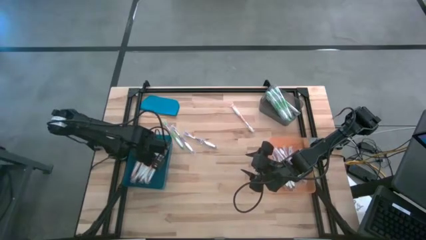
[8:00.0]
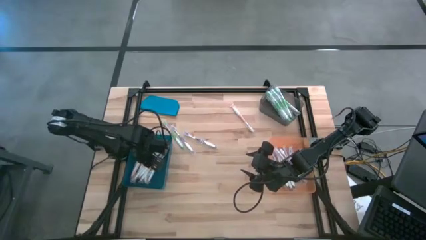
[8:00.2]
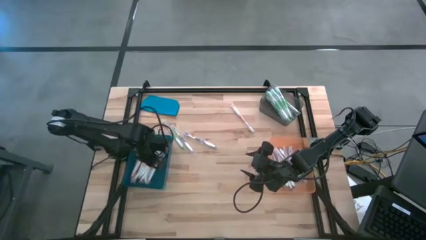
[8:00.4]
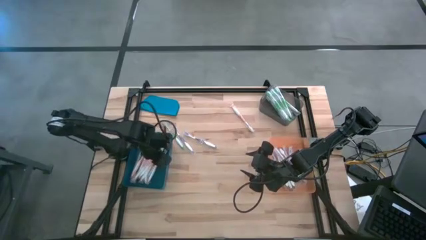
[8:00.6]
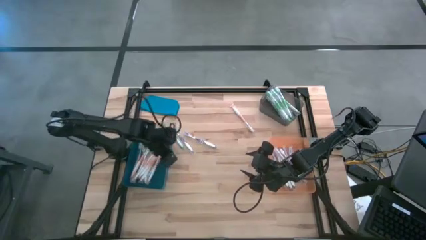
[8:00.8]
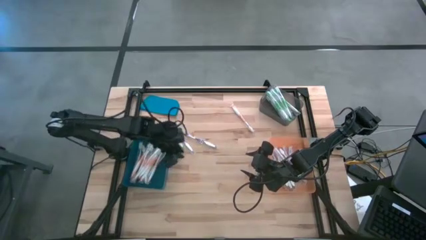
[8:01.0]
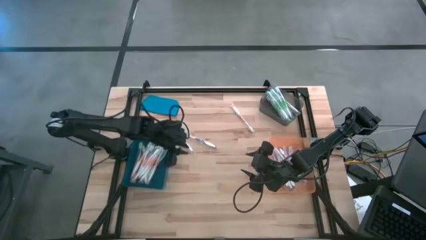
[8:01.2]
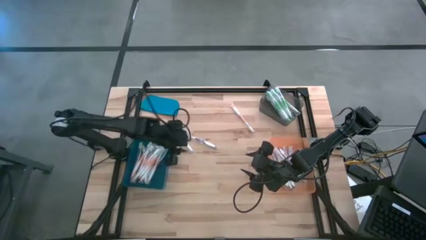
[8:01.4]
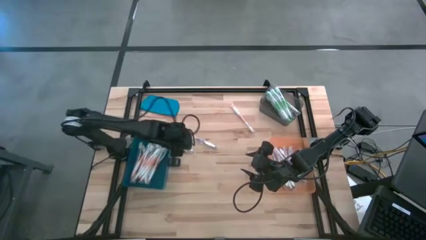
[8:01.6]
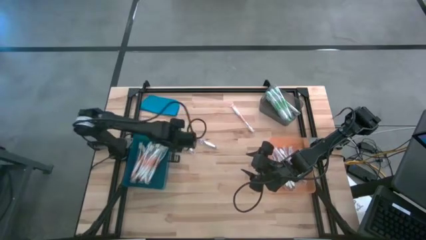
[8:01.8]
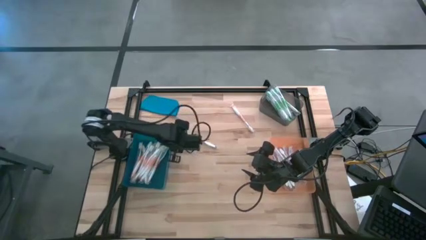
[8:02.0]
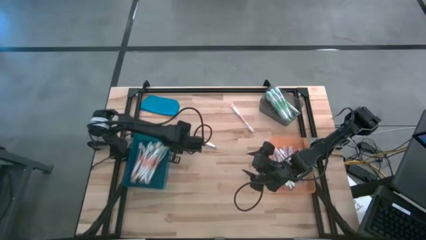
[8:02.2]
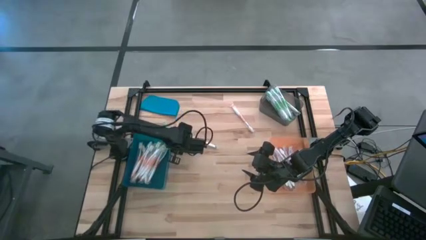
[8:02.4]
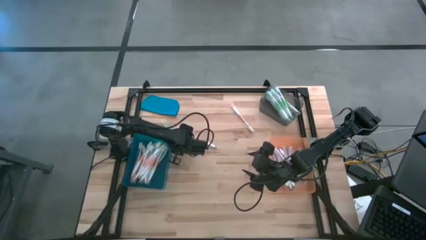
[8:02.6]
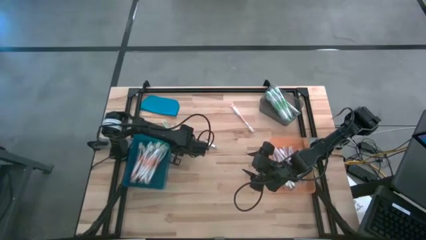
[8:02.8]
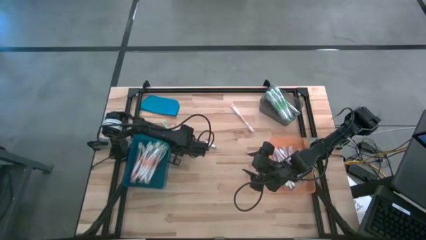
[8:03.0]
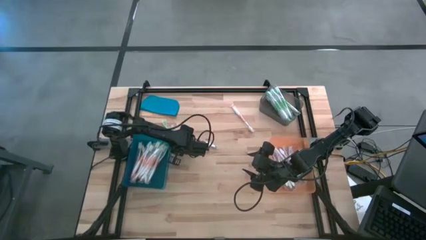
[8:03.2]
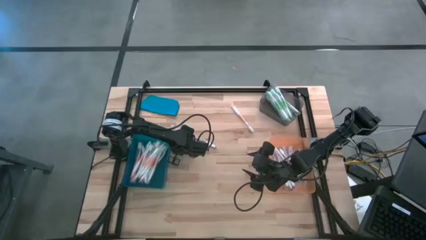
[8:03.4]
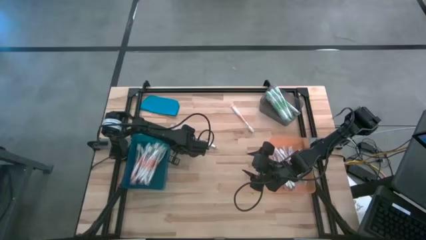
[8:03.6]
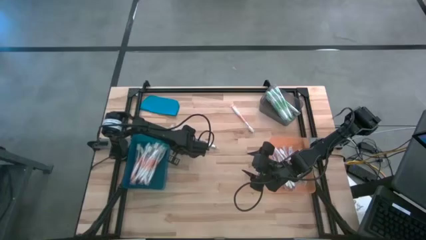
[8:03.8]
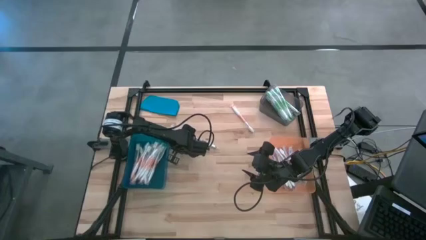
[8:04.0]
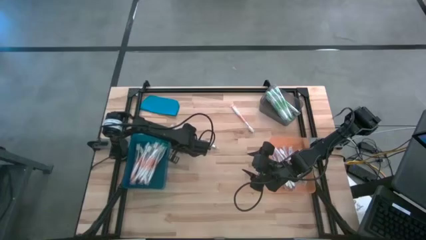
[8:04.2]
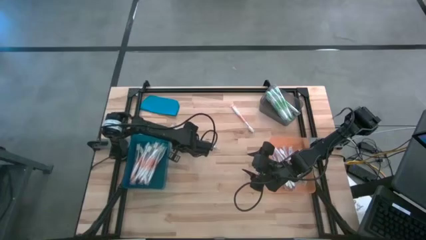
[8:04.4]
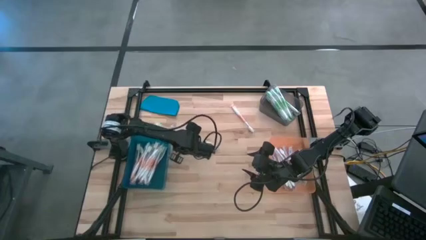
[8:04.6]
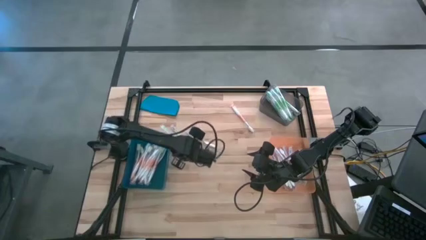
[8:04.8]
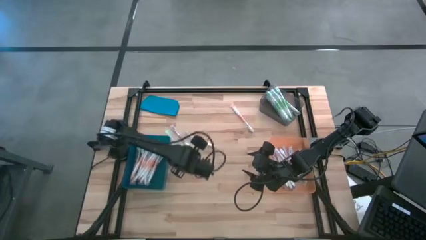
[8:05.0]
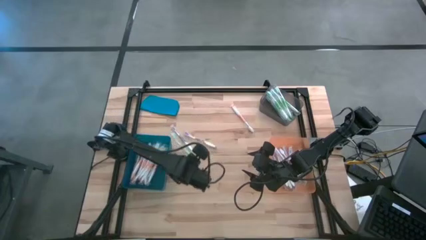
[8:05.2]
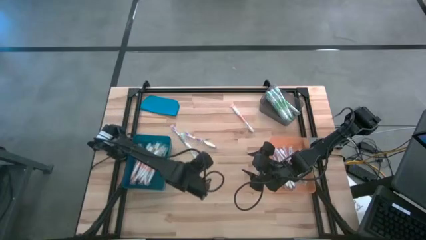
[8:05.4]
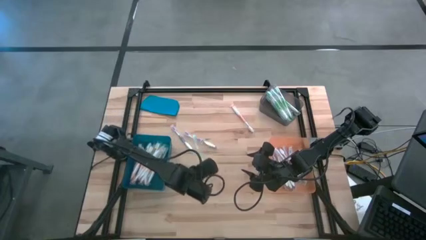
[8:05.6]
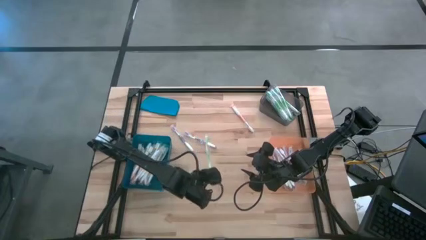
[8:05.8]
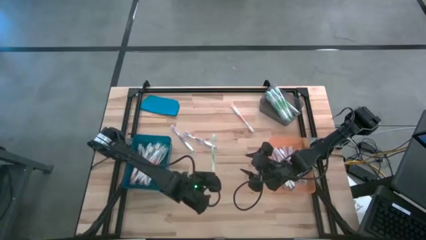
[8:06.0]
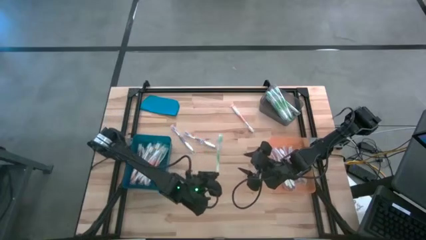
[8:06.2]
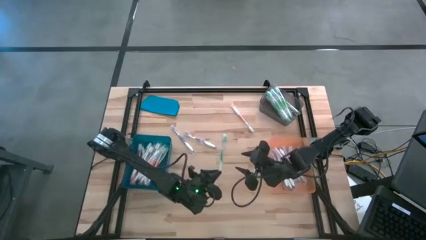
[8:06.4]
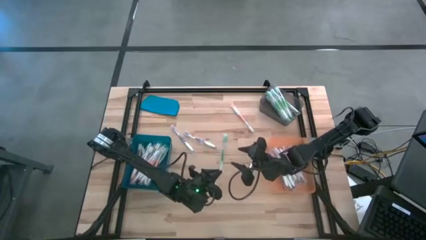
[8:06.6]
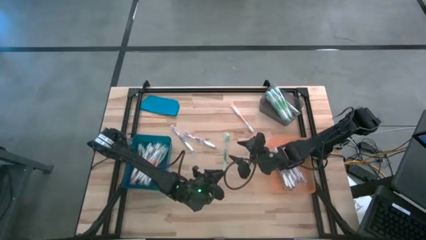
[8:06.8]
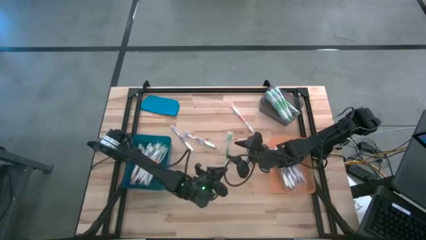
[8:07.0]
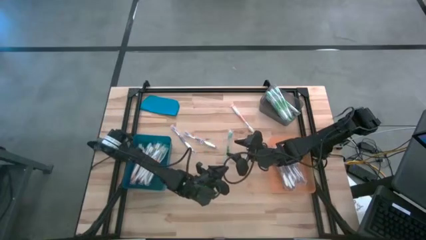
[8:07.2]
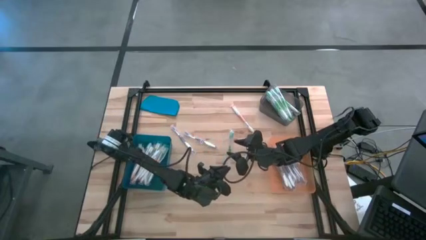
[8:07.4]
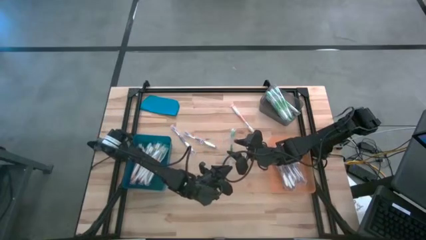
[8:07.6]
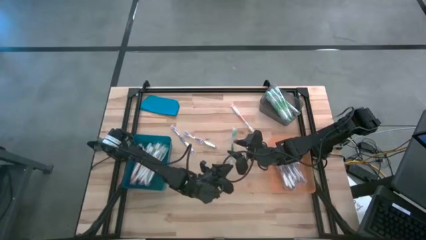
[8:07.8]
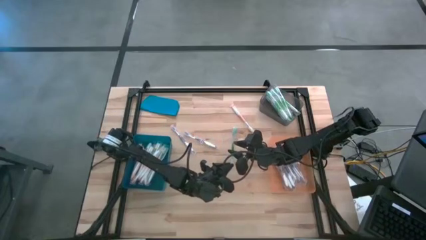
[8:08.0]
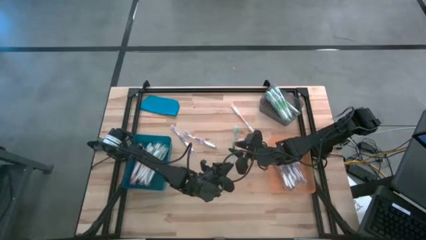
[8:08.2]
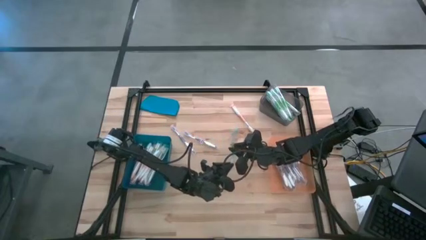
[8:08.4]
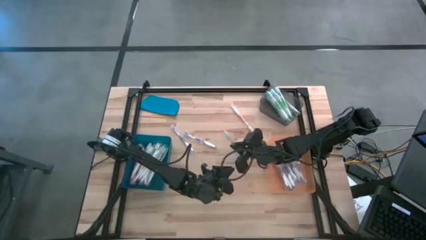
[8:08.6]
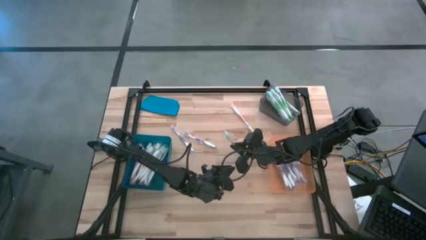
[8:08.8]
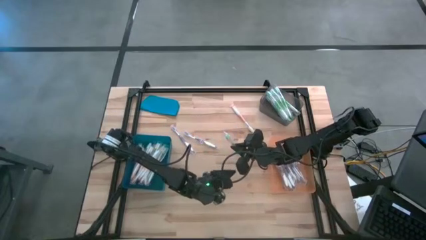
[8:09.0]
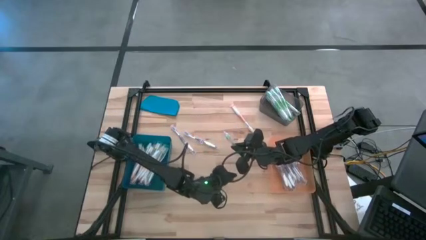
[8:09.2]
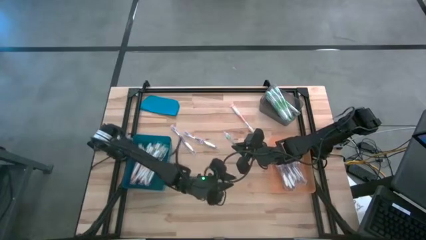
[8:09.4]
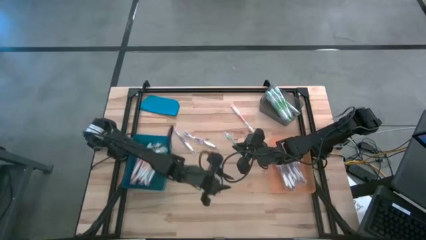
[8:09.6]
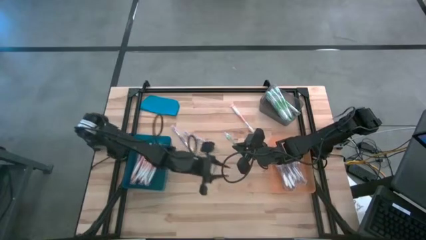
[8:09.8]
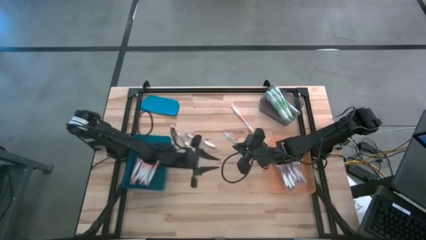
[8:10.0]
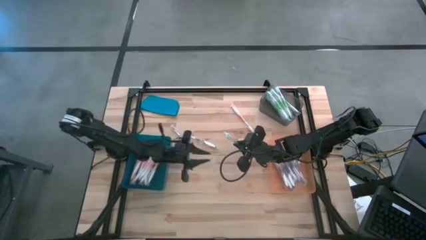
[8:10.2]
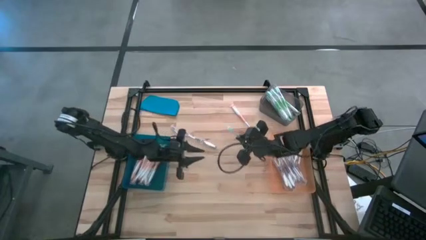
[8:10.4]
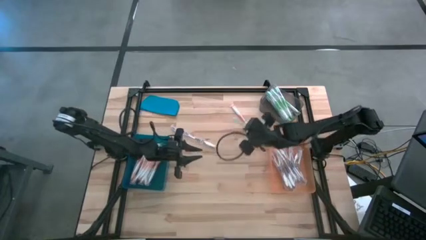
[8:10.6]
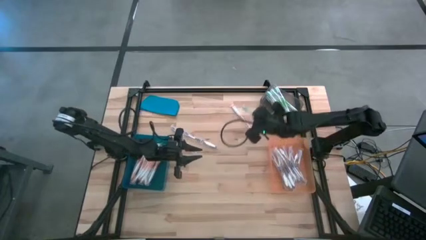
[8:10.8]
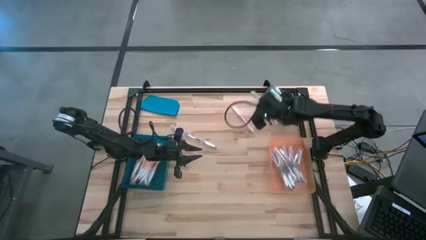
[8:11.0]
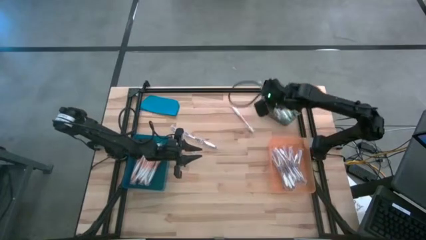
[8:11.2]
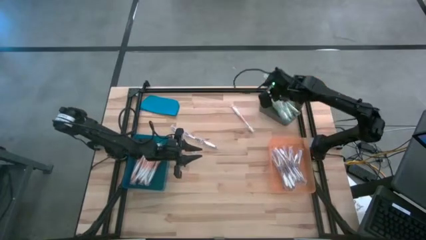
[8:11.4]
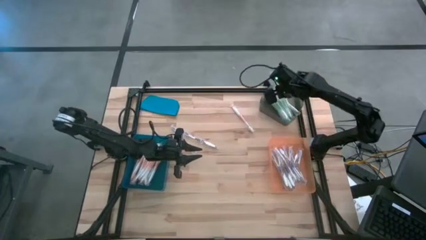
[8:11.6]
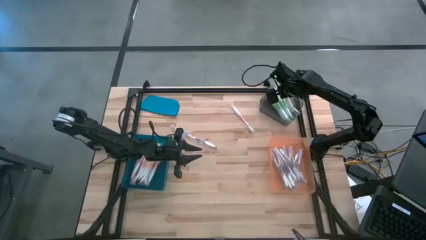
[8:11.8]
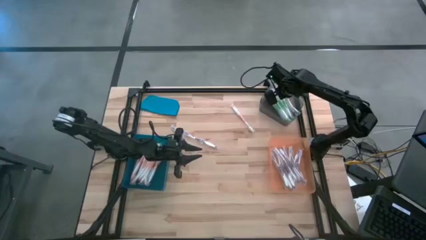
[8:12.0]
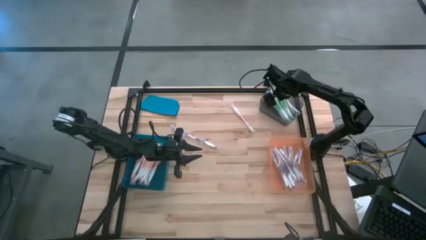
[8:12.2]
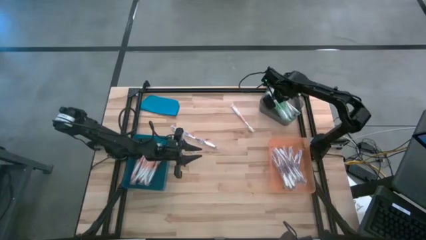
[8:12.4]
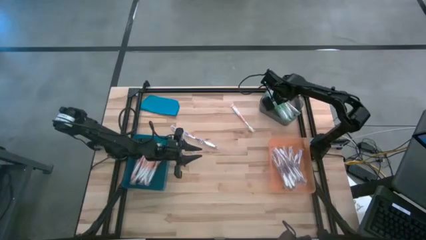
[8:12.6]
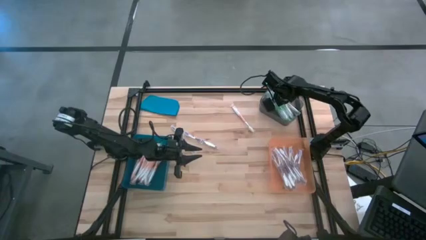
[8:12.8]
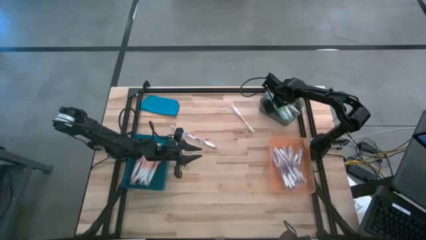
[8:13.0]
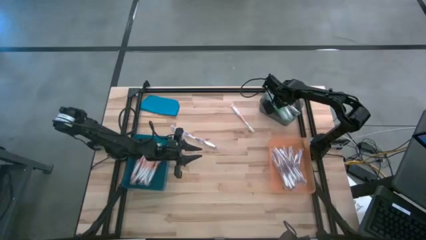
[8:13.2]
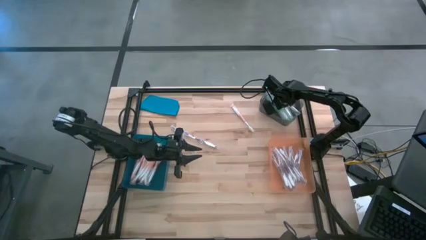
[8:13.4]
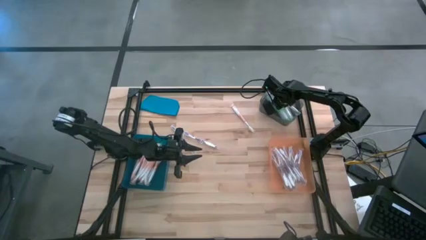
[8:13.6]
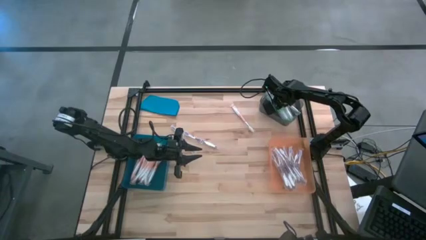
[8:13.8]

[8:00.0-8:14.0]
Task: Pick & Place Toothbrushes
Put the green toothbrush into the black bin
